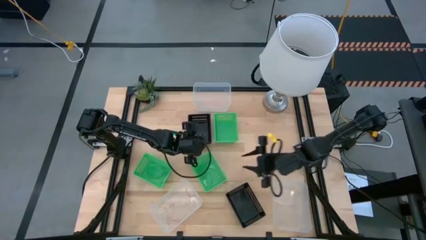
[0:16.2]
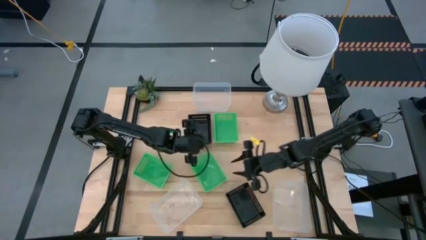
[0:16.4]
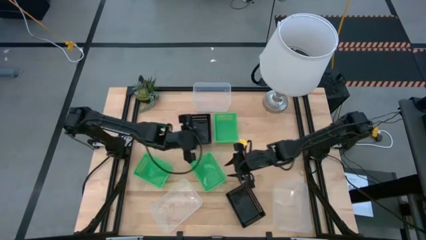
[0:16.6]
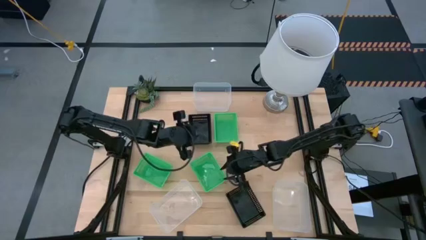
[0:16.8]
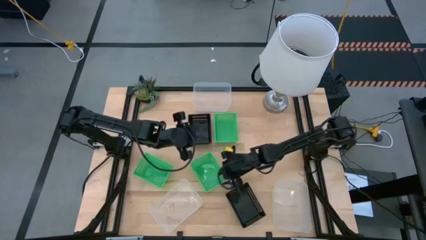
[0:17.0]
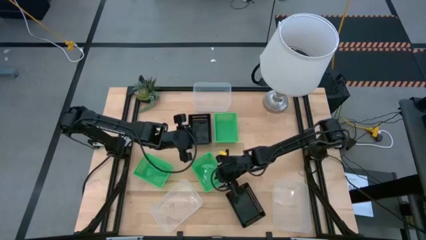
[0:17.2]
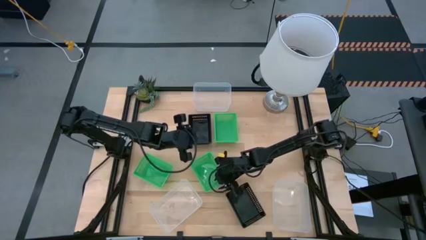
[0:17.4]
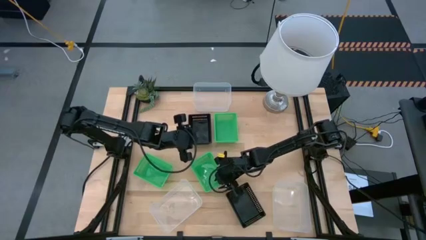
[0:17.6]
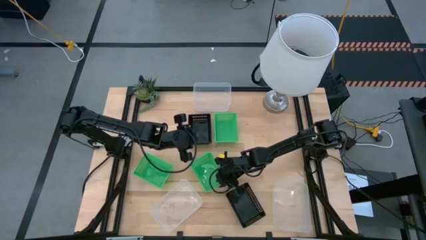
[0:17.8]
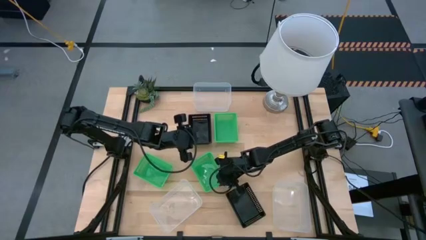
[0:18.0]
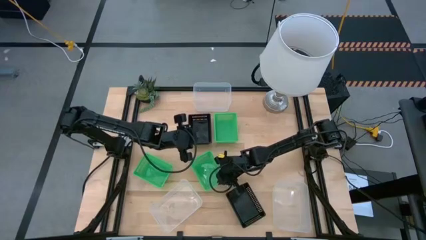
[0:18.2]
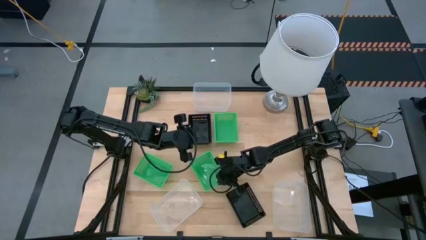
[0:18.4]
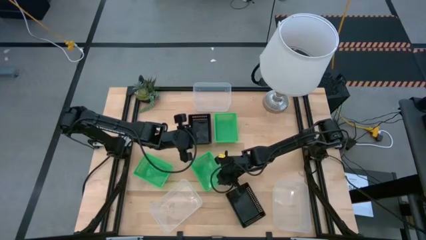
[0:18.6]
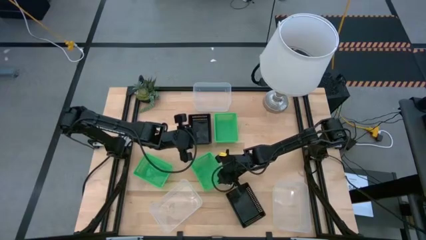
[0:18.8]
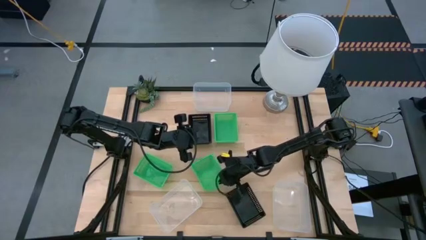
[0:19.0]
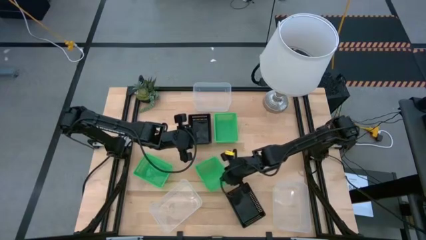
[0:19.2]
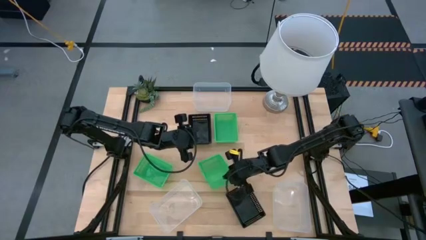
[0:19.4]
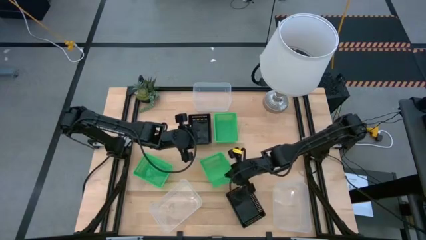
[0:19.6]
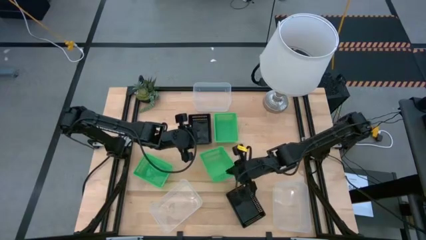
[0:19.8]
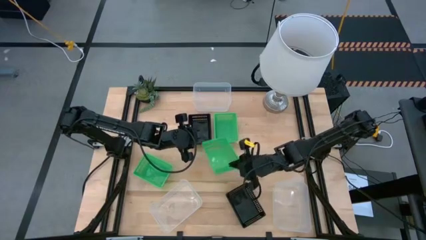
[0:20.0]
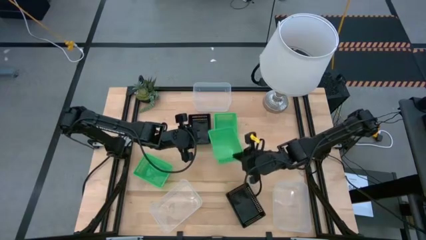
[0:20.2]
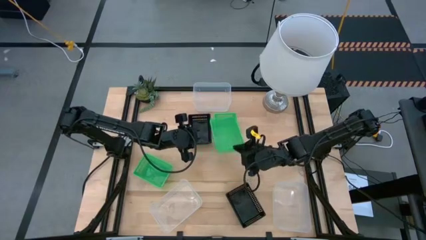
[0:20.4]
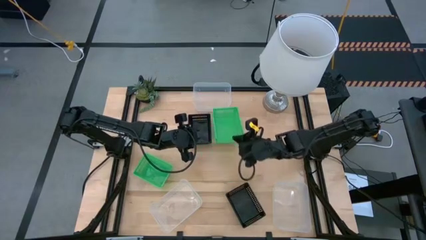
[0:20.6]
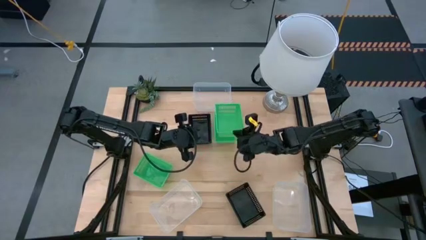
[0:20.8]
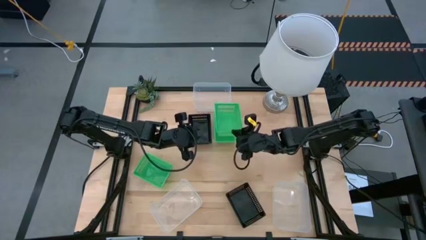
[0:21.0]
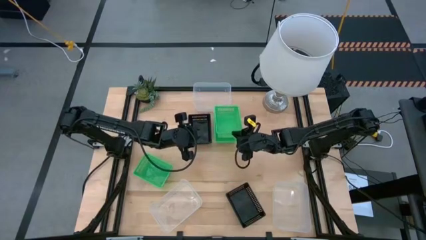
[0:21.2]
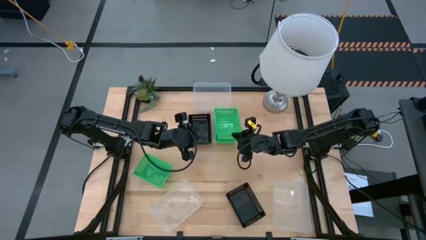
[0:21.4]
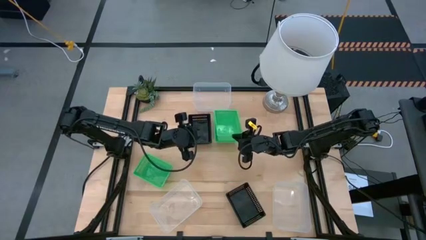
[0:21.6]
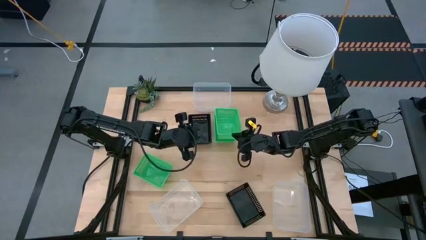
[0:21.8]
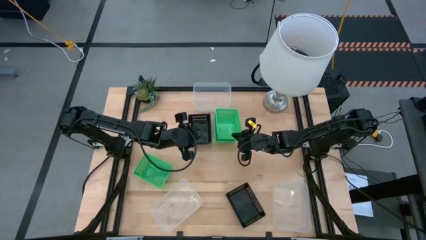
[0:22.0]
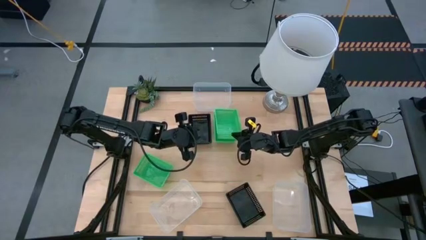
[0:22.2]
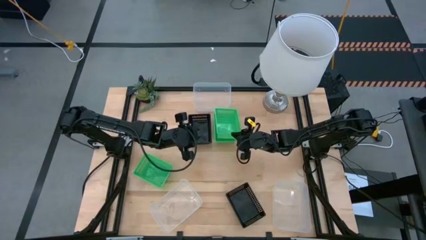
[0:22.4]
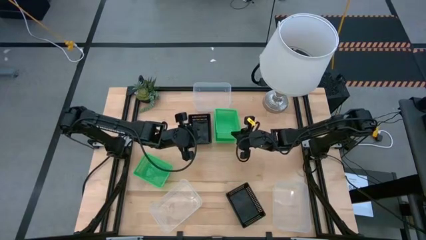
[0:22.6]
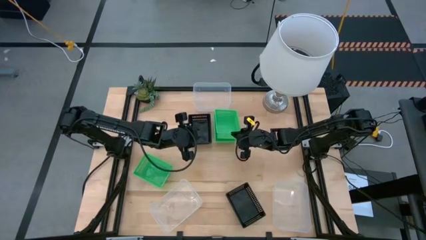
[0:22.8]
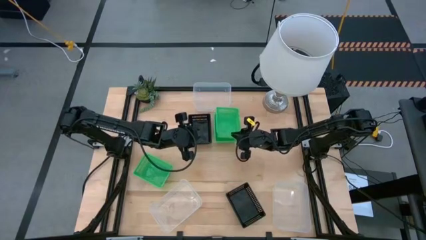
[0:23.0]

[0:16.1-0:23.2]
Stack the bottom right green bin on the top green bin
